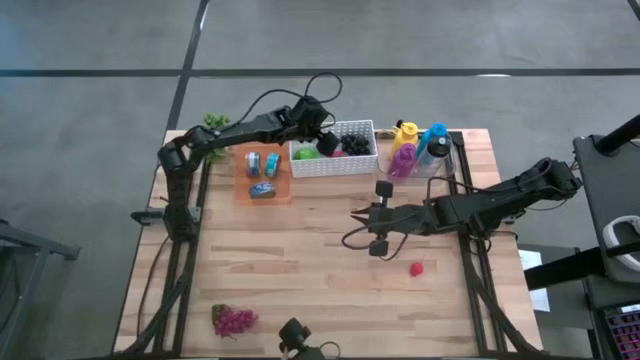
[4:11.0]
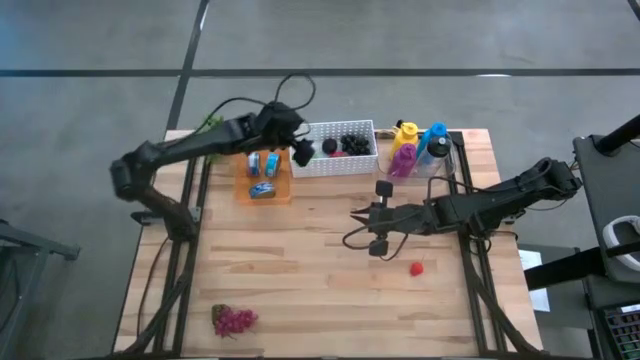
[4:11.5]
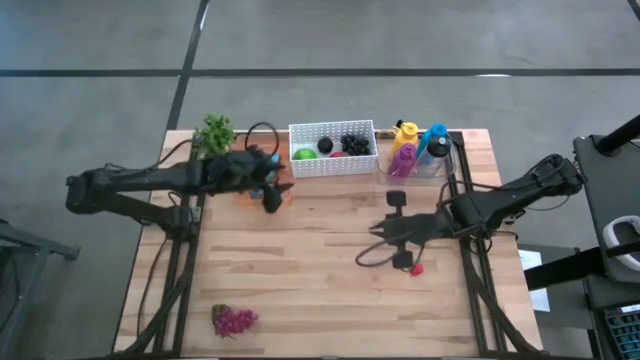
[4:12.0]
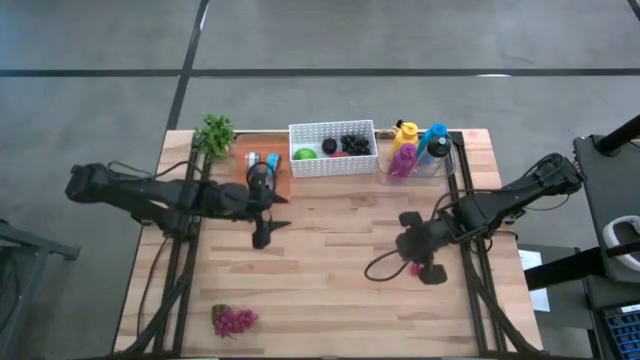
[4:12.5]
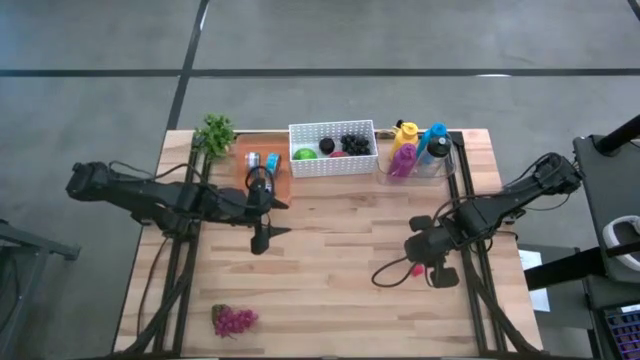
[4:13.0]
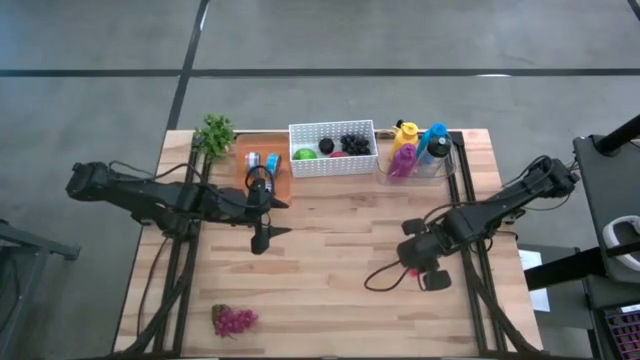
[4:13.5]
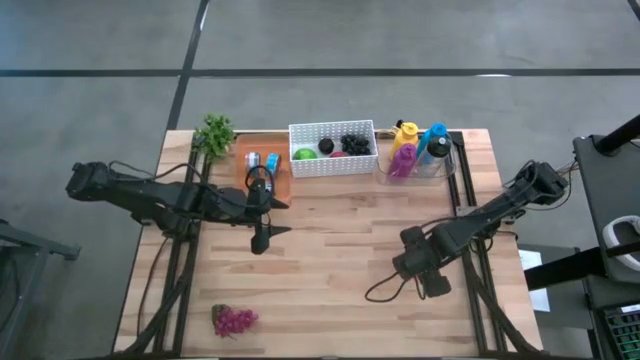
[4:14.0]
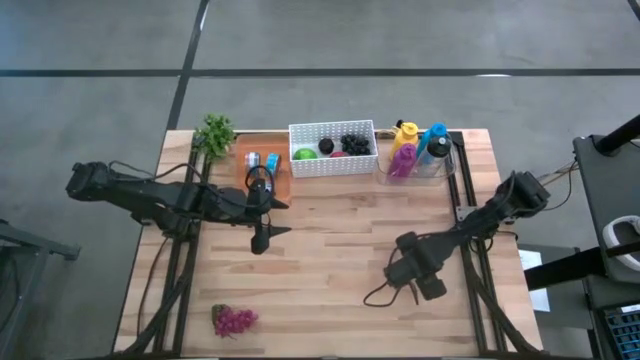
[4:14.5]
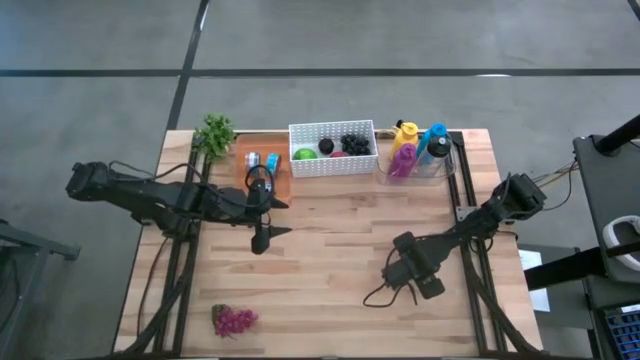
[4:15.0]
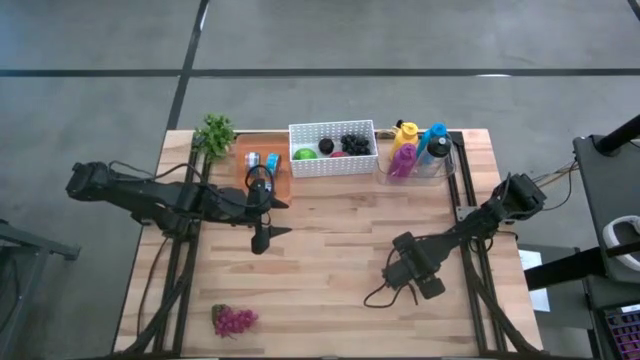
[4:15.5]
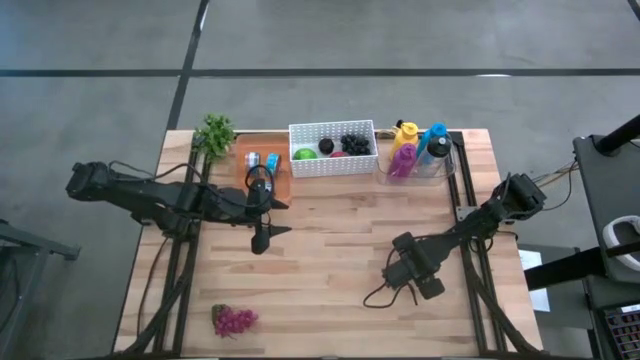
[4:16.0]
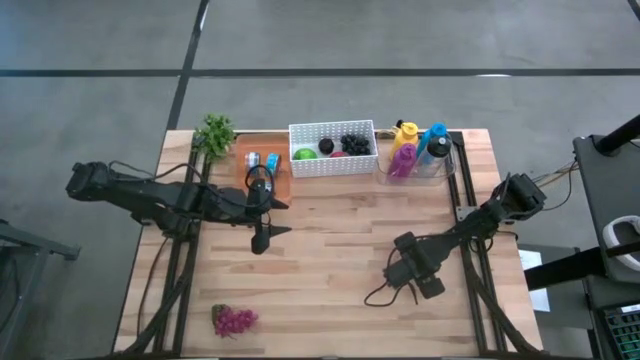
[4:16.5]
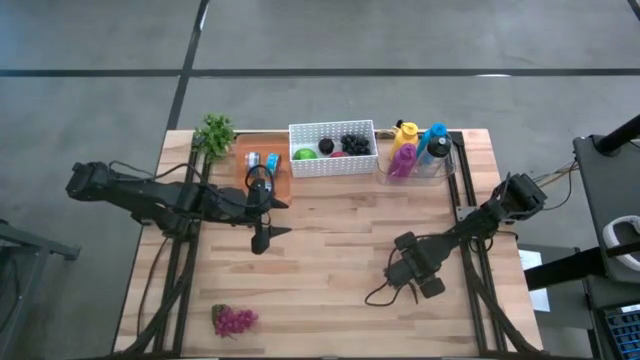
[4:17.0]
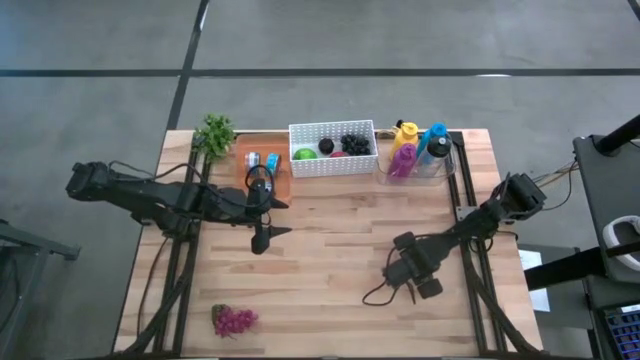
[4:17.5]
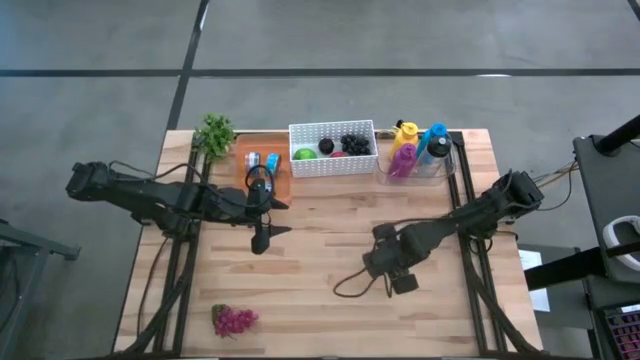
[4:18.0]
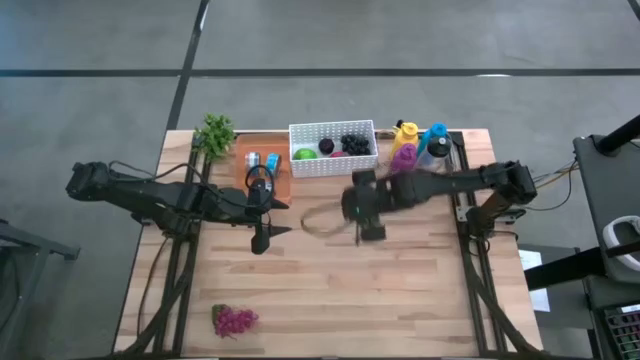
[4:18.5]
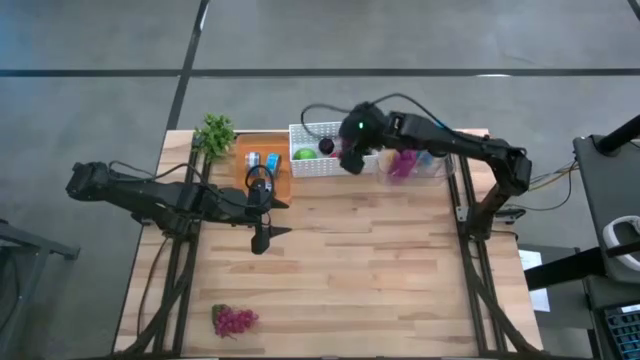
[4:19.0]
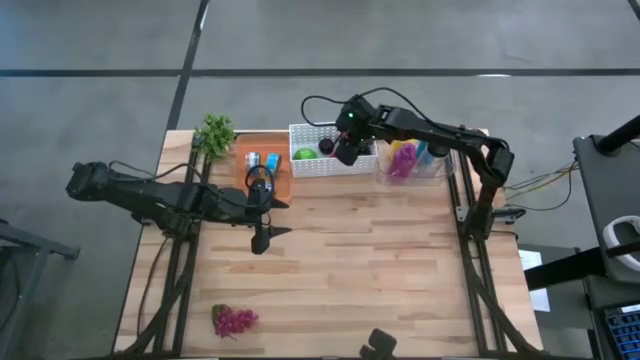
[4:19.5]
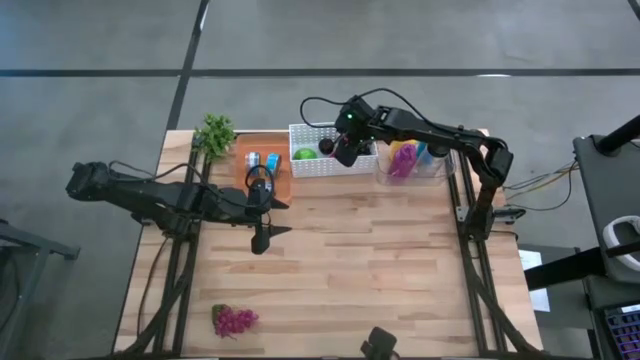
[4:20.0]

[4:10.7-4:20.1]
Task: Pick & Place Food Item
Put the strawberry into the white bin

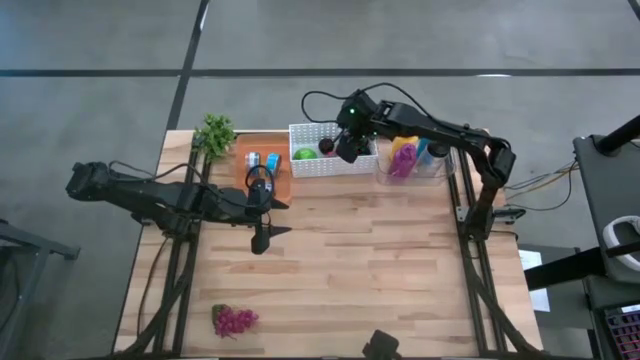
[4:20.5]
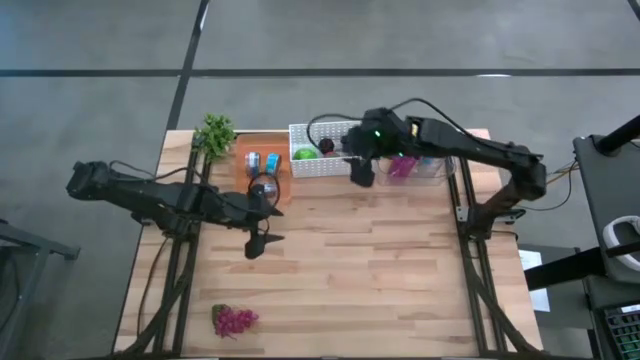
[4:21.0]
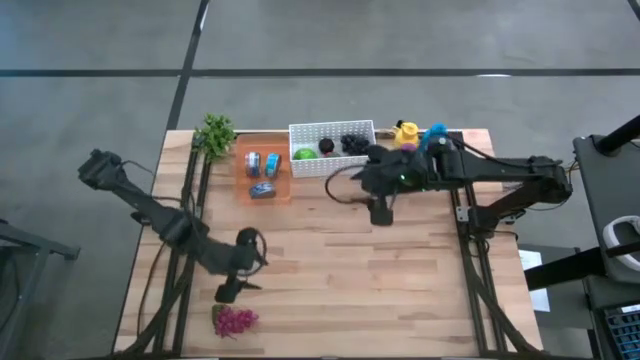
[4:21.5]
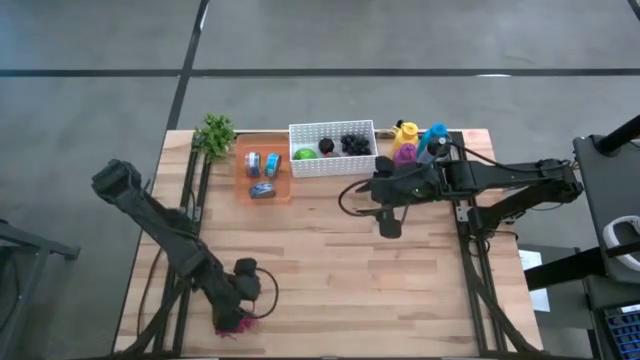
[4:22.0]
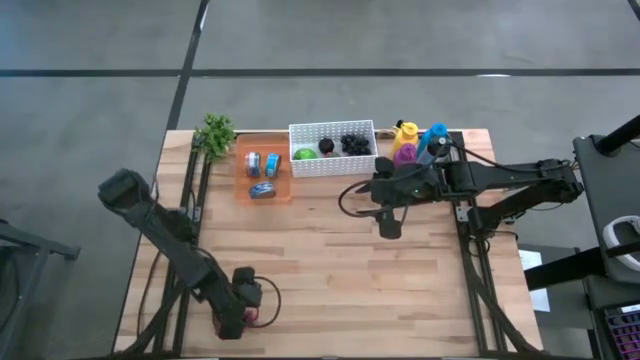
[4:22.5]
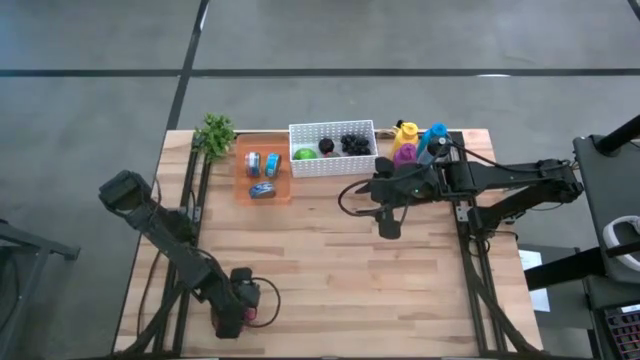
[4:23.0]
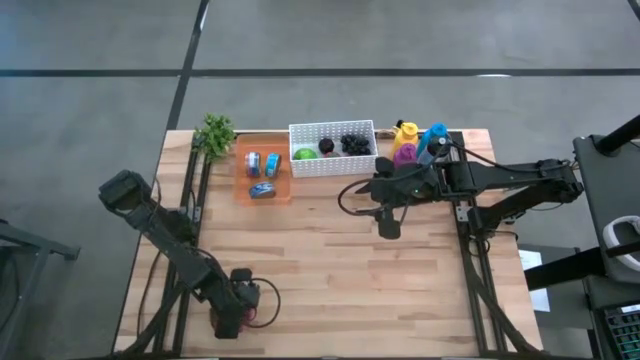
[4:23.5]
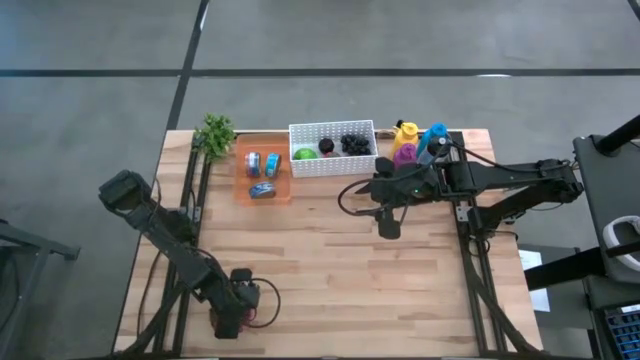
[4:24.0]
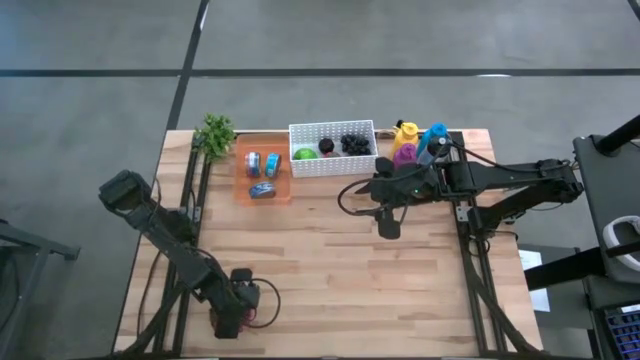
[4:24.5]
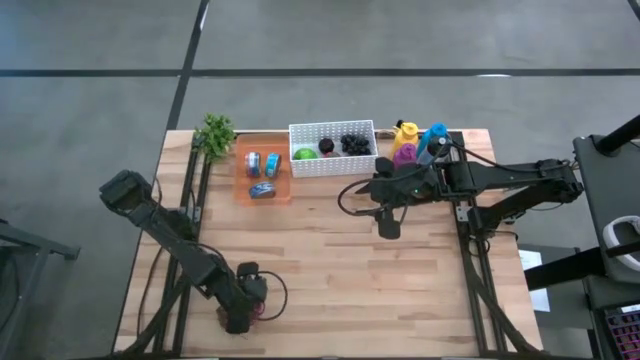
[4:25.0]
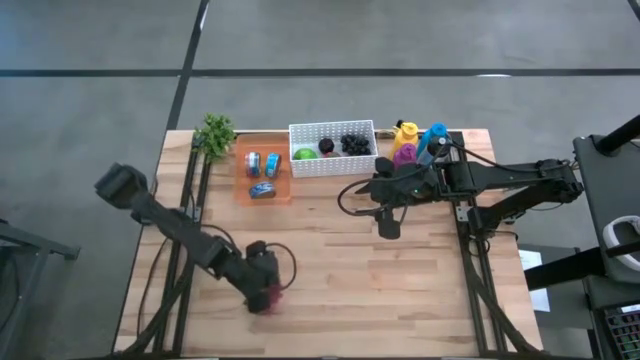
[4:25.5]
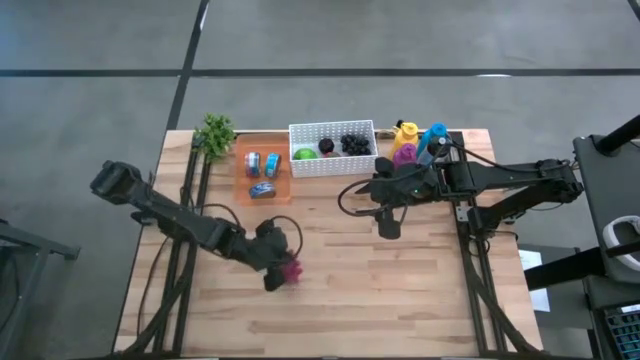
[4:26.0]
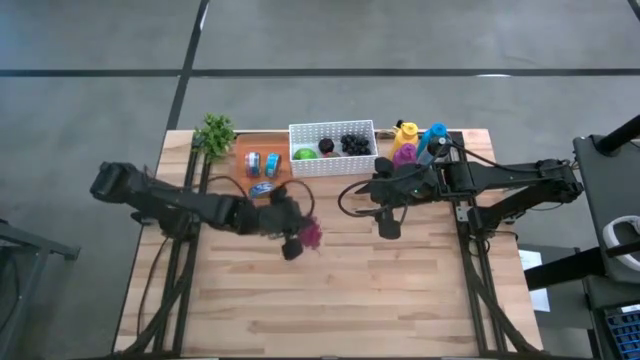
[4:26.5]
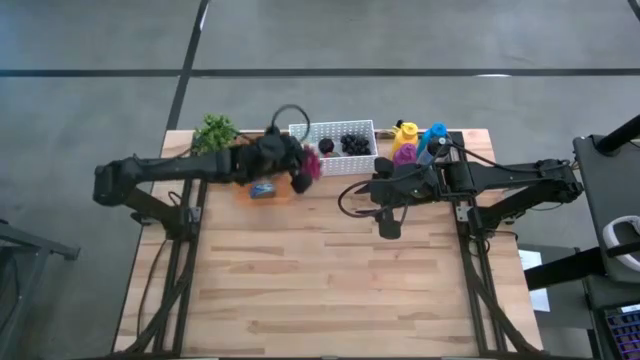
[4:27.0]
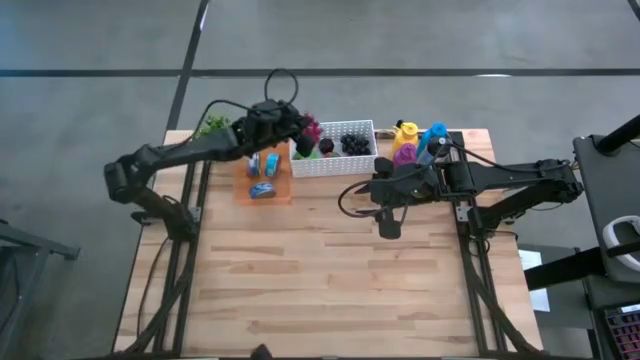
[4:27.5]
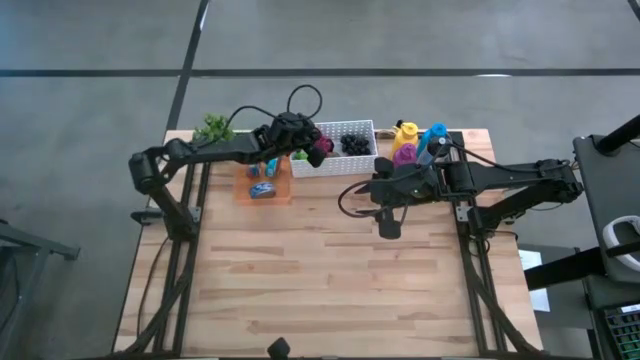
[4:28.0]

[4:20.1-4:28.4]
Put the purple grapes into the white bin

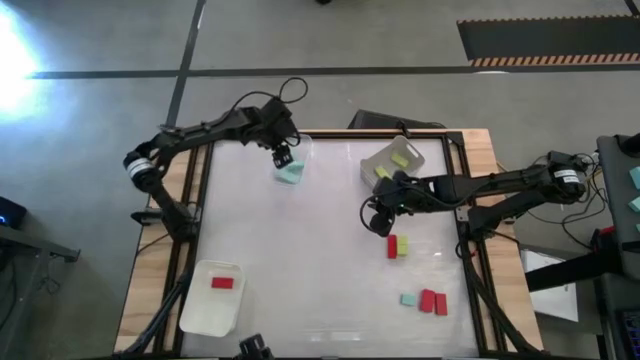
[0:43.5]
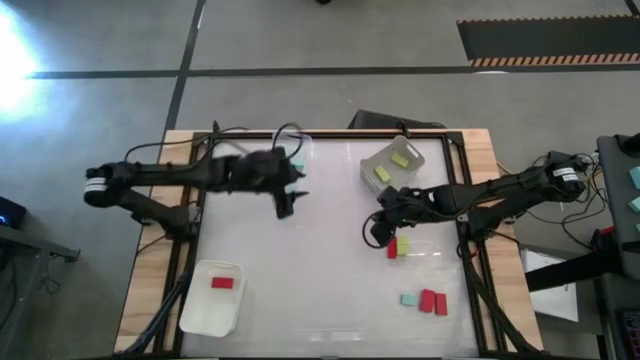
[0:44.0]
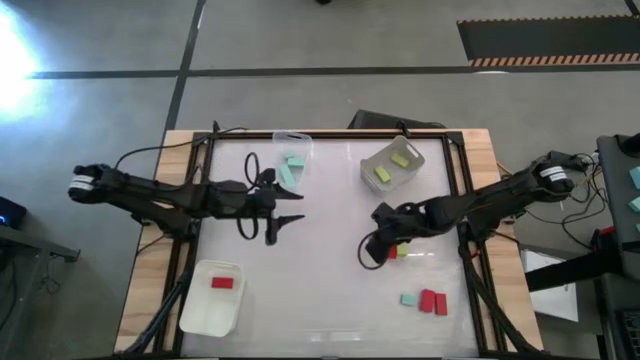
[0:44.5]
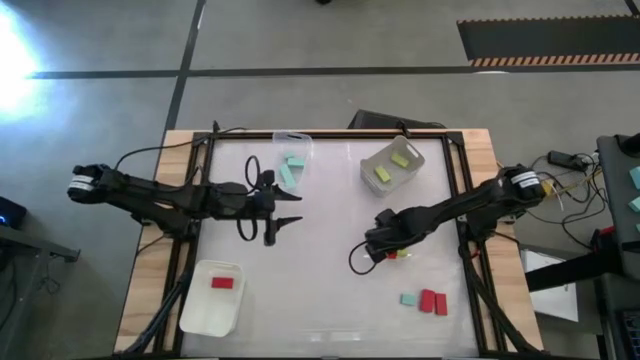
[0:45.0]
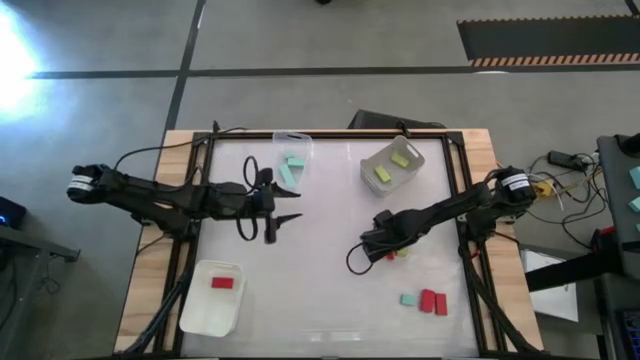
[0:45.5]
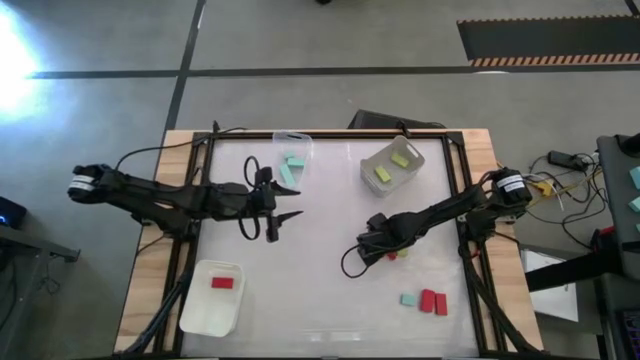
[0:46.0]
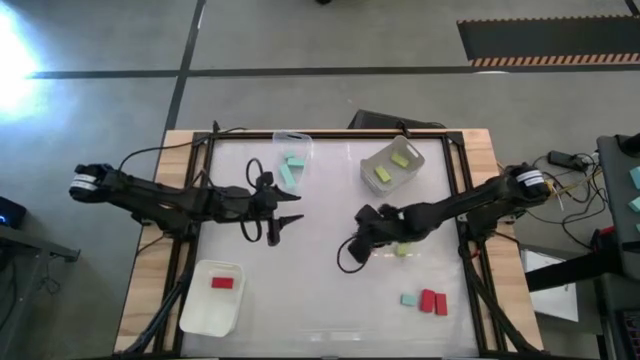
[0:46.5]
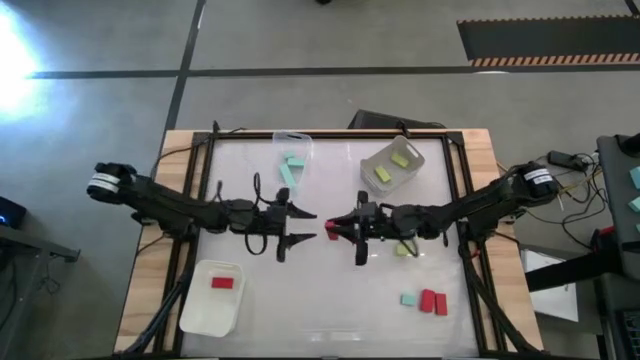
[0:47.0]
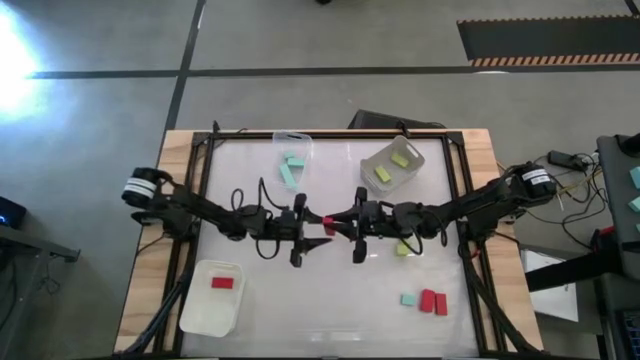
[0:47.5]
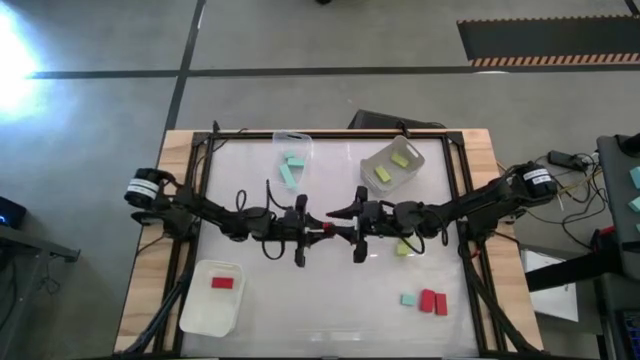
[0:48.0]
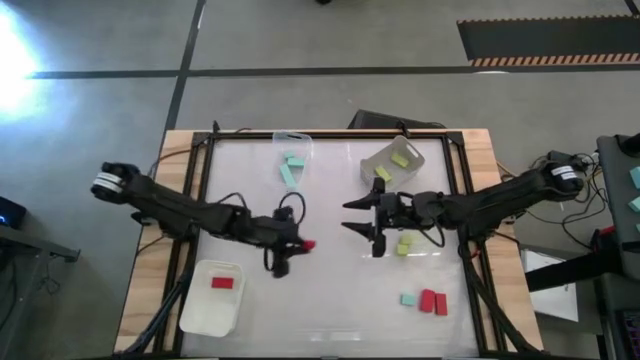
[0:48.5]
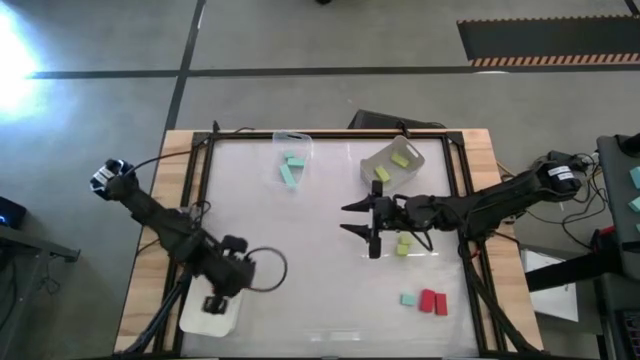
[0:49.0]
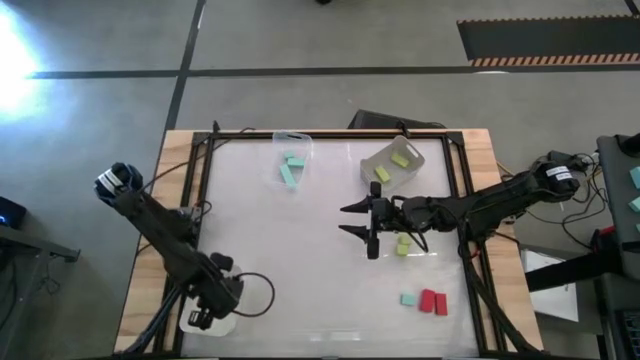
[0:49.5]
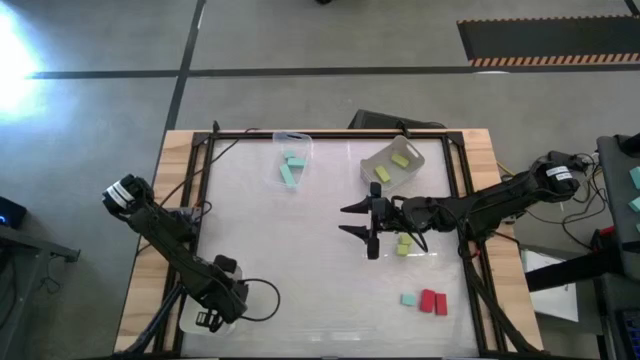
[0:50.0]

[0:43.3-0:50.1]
Task: Sort & place blocks by color
Put the red block into the white bin
